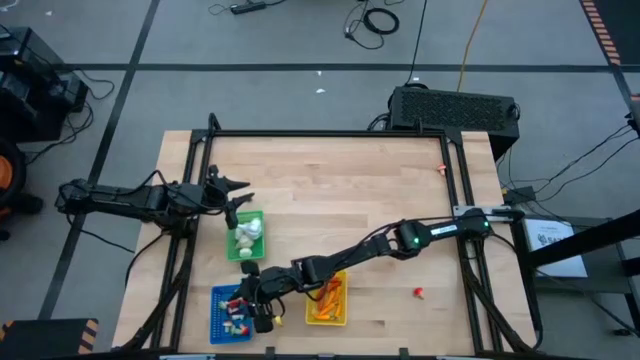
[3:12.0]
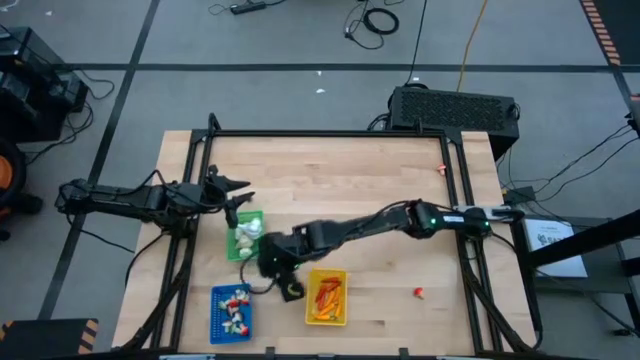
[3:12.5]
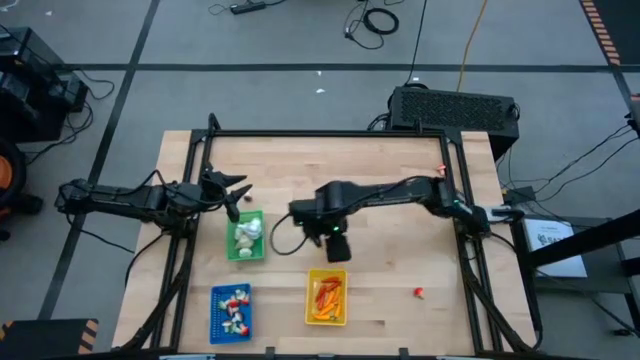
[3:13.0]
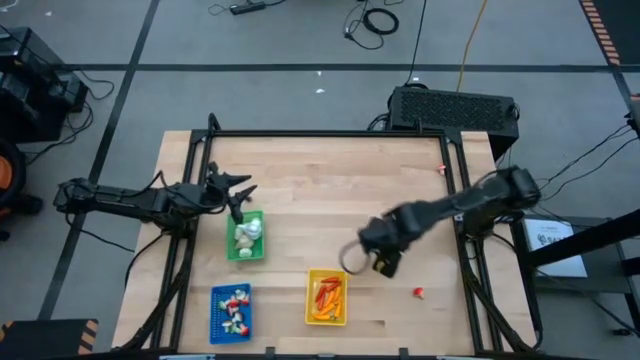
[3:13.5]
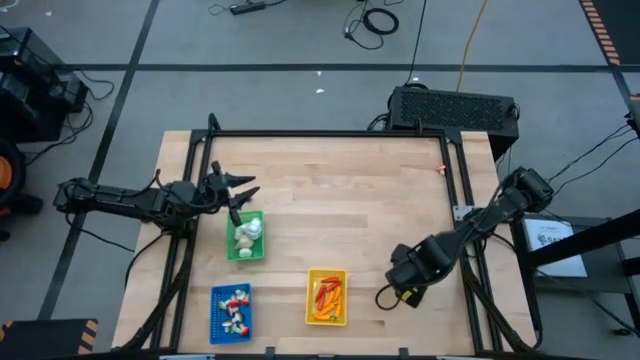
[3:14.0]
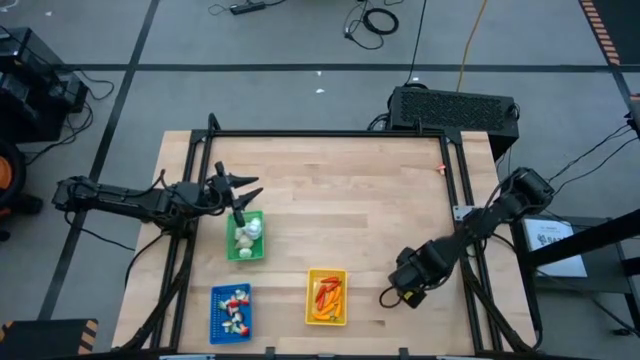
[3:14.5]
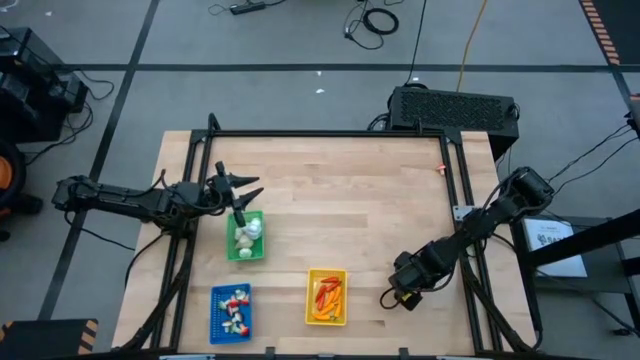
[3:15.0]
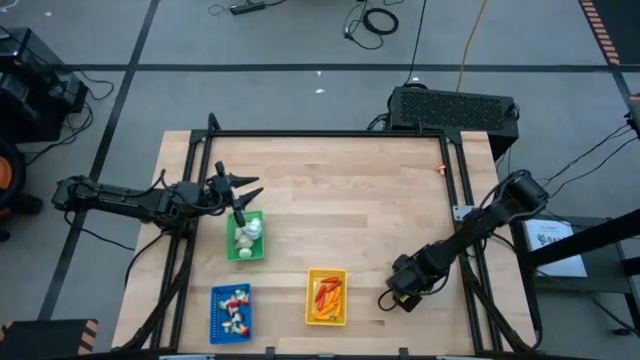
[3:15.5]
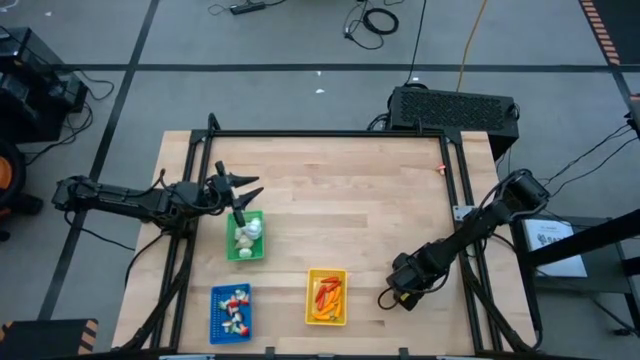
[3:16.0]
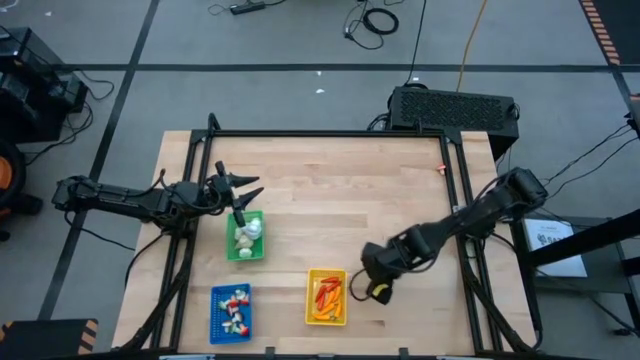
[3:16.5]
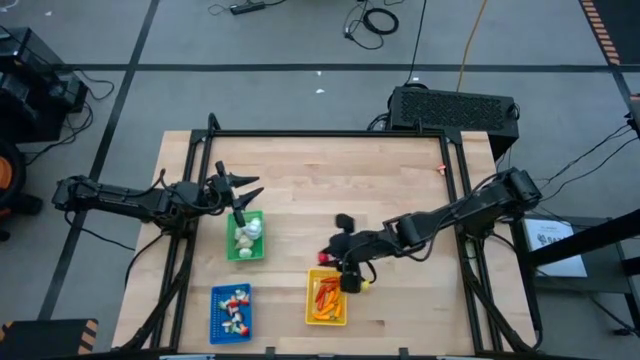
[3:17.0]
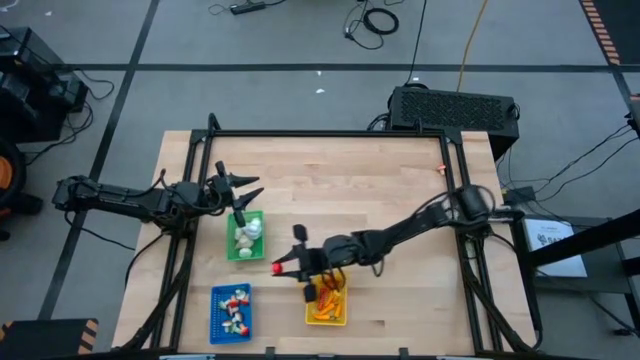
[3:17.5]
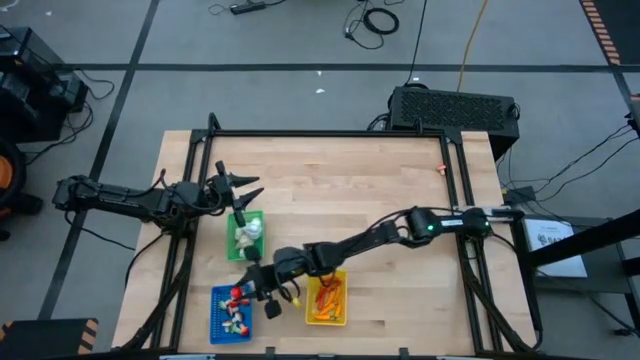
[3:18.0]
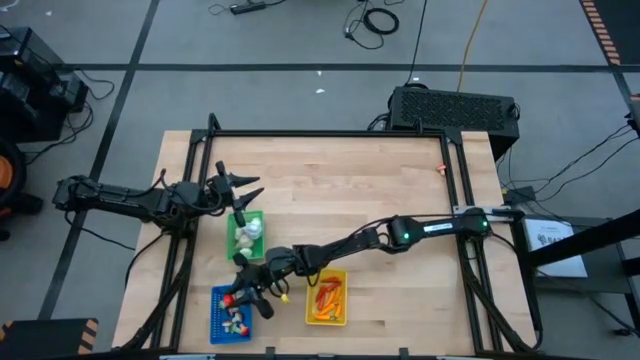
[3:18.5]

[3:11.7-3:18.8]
Task: Sort produce into baskets
Put the red mushroom into the blue basket

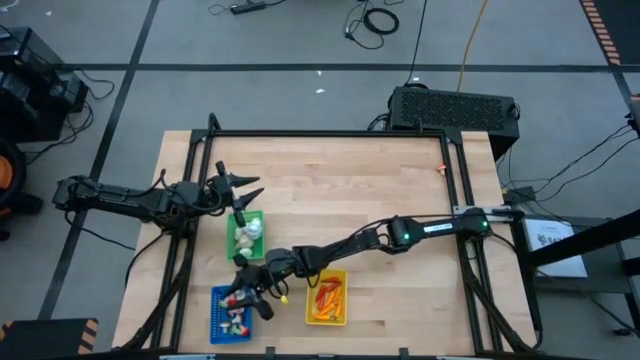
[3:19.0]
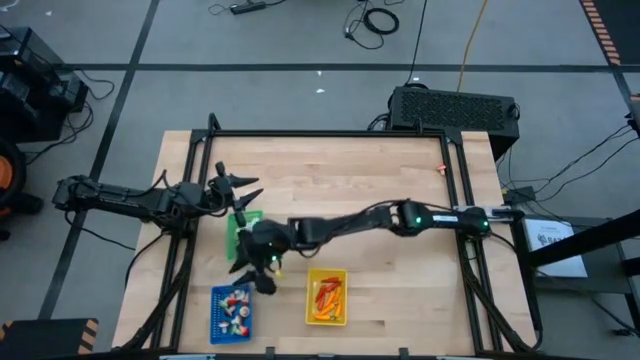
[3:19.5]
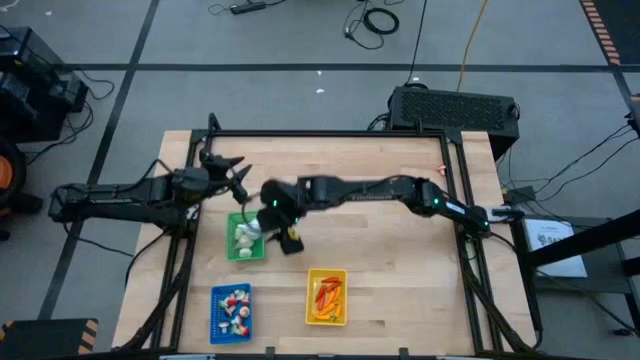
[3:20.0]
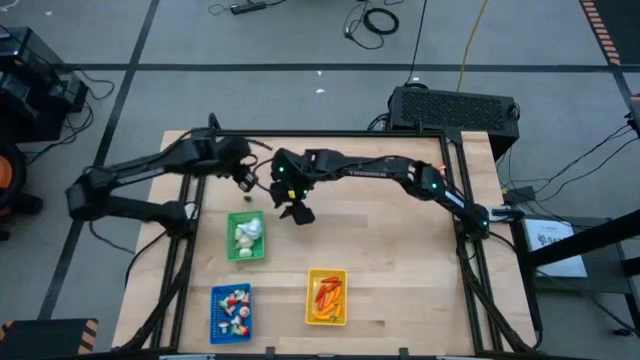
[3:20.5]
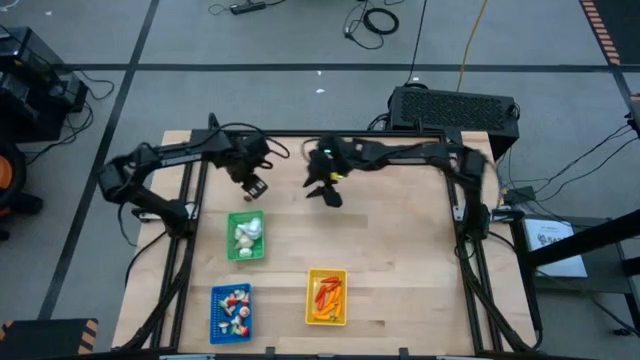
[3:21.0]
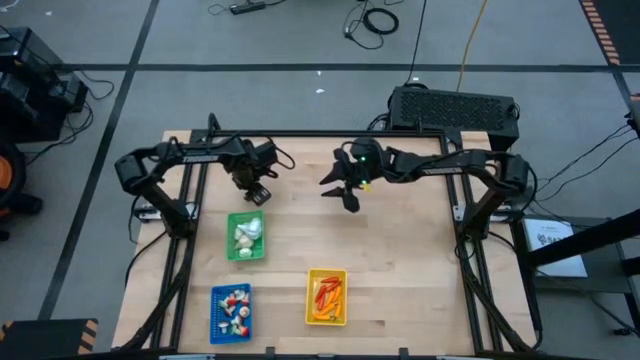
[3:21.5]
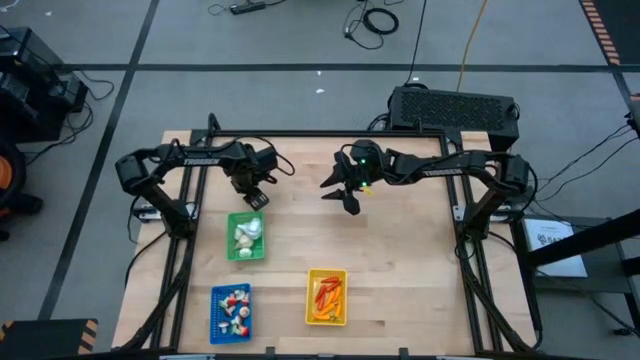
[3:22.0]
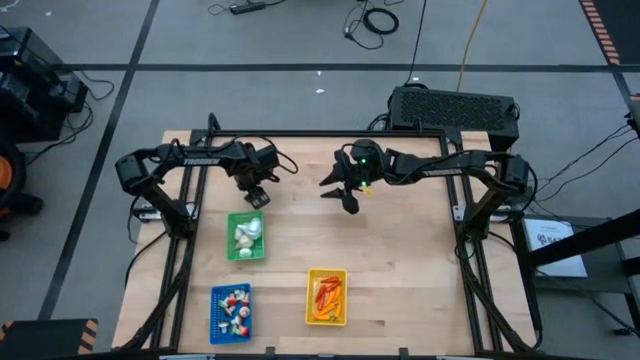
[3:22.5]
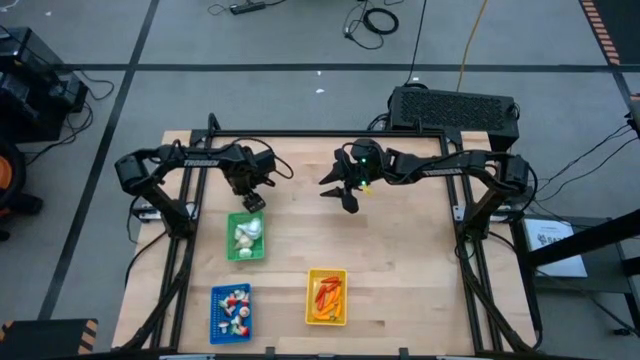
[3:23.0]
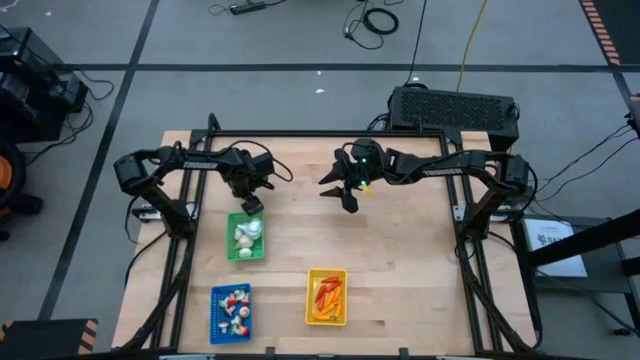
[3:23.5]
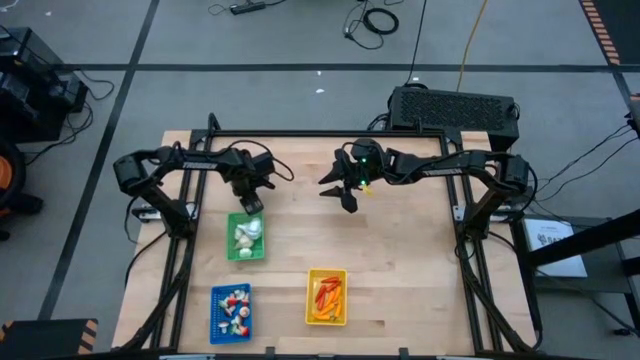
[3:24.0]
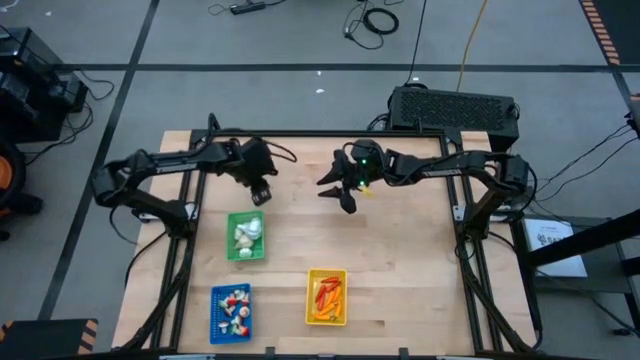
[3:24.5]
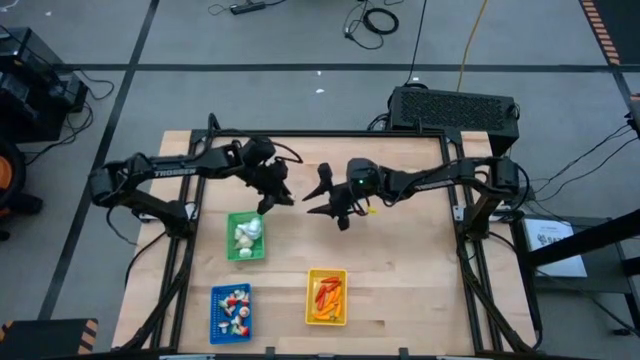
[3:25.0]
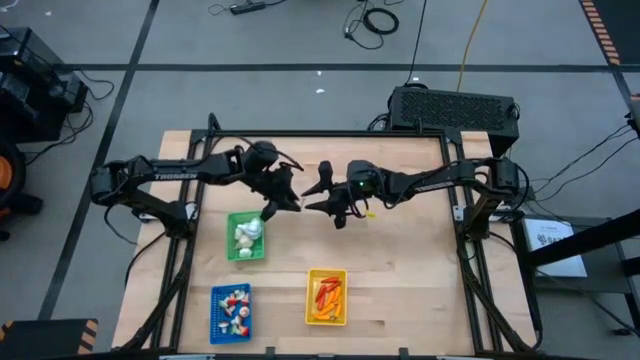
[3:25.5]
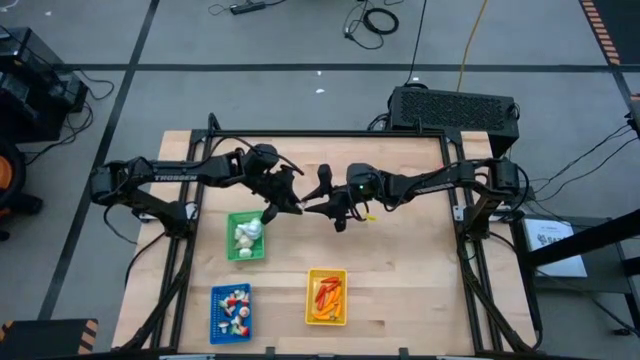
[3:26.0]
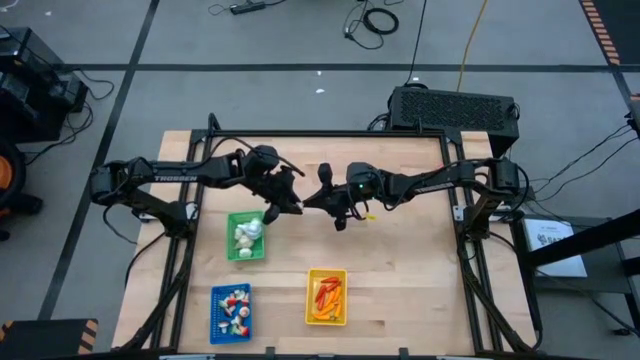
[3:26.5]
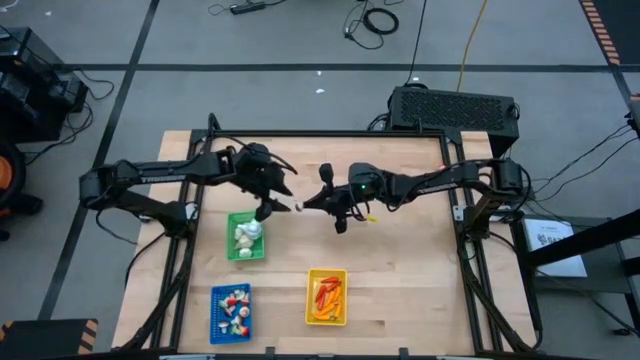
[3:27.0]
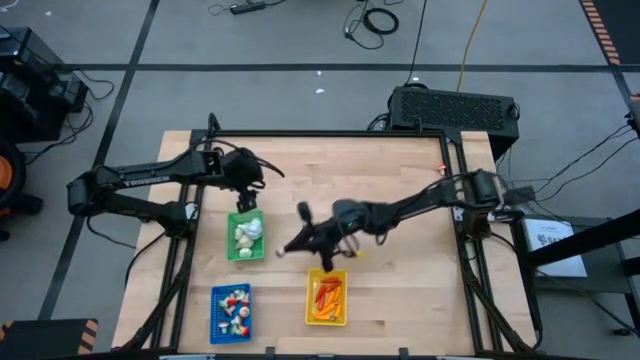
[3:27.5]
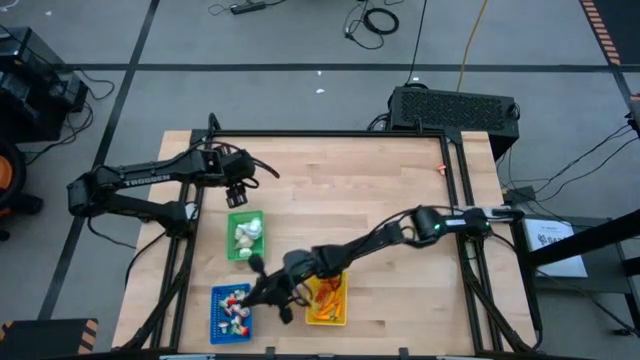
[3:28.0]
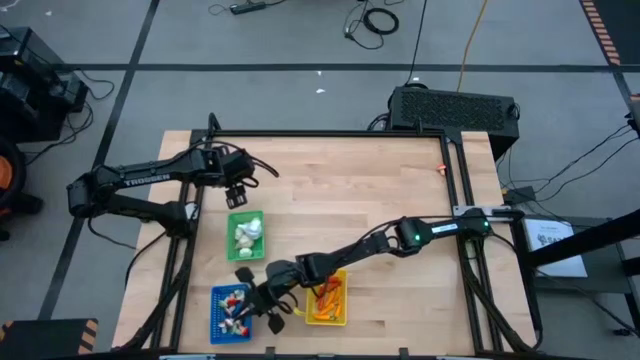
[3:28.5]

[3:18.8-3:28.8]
Put the brown mushroom into the blue basket

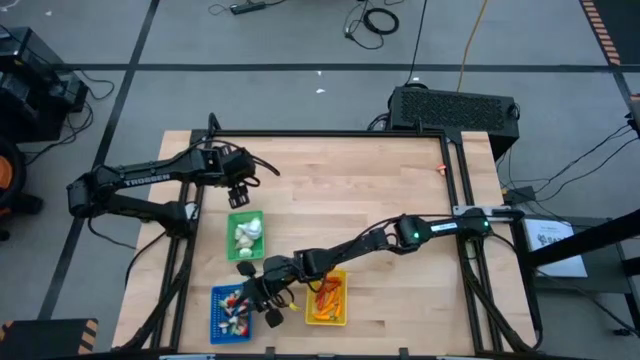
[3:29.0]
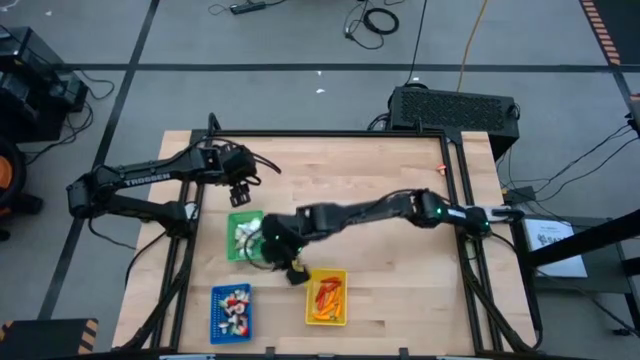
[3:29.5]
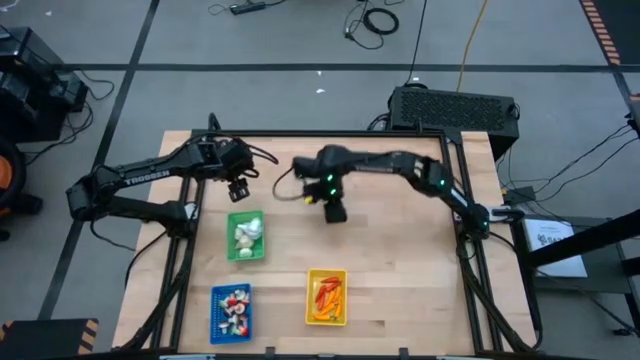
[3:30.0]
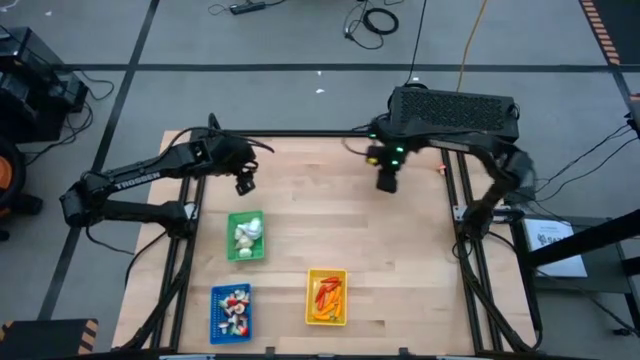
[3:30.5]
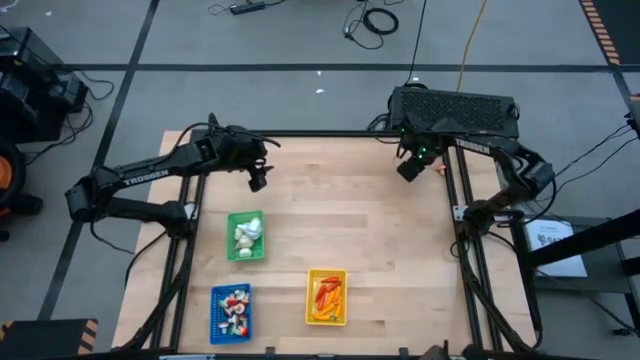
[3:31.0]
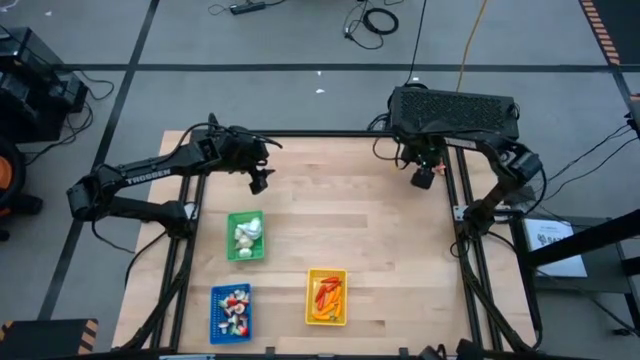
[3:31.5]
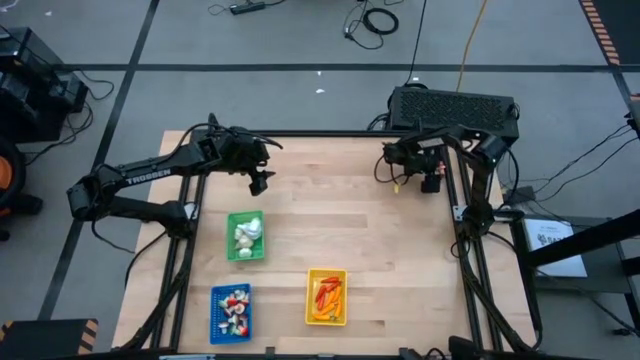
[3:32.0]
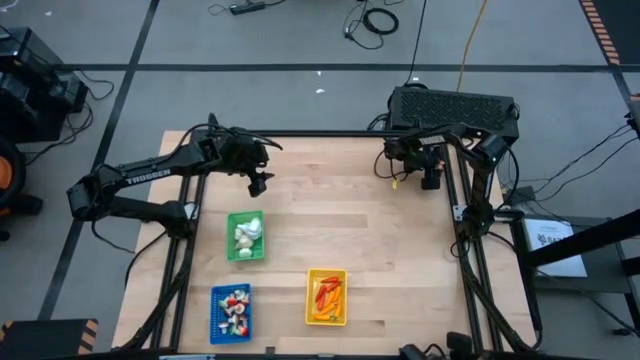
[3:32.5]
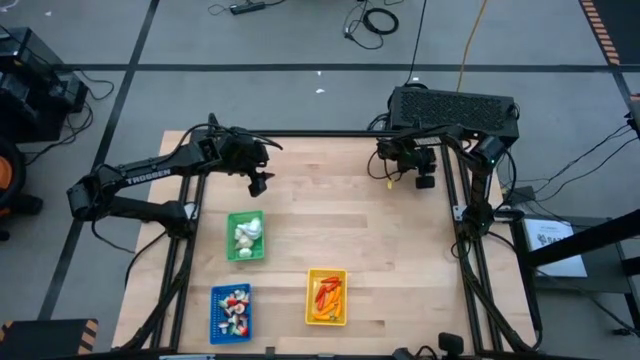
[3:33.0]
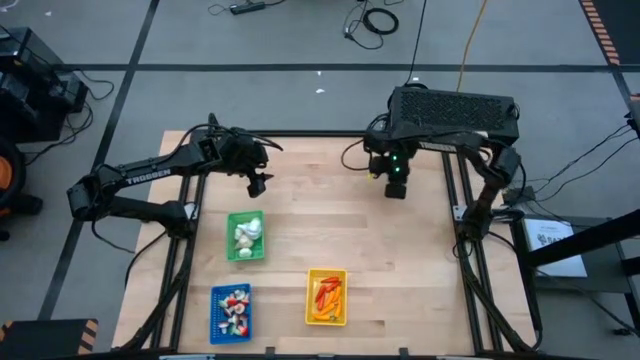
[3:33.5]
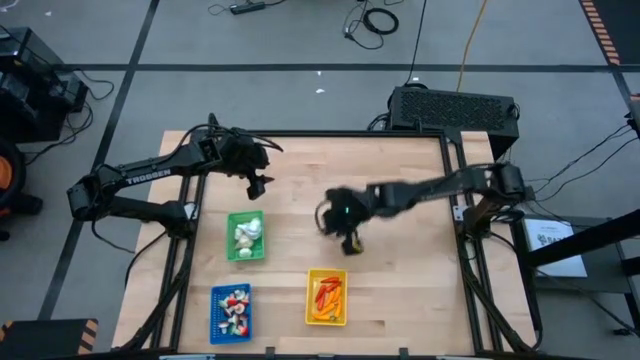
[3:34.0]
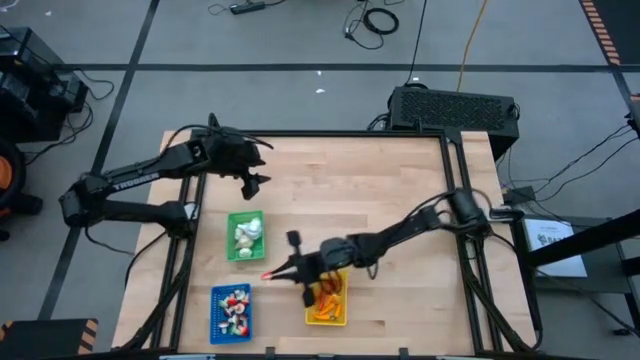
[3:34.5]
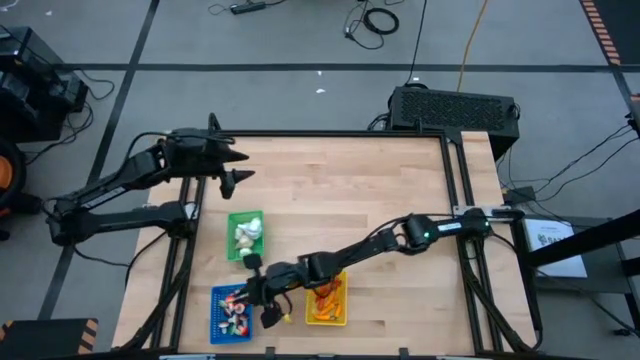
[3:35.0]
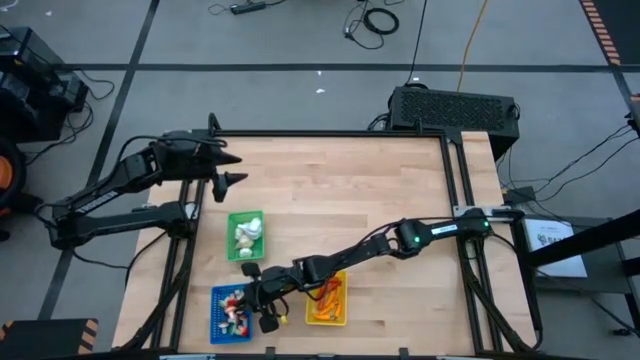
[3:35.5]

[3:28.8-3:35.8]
Put the red mushroom into the blue basket
